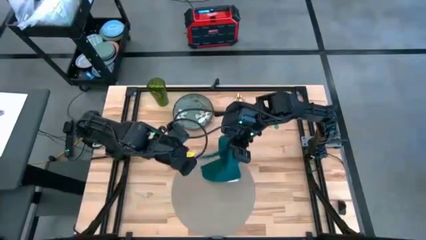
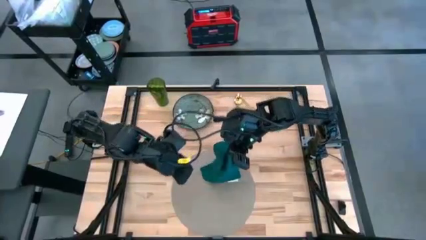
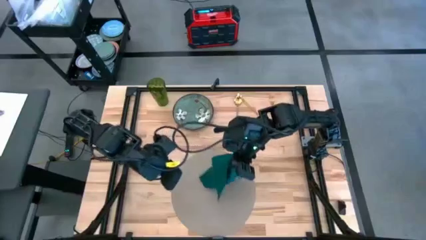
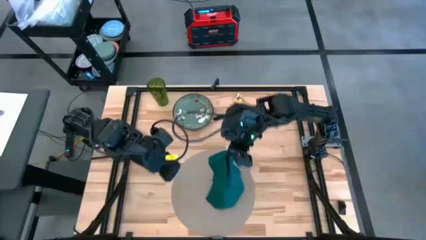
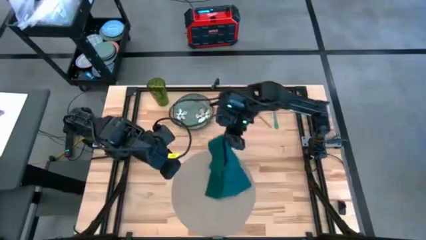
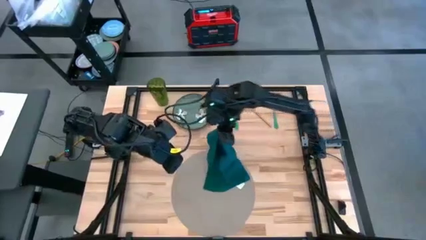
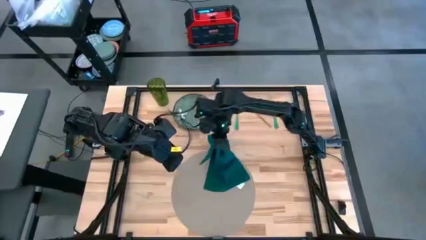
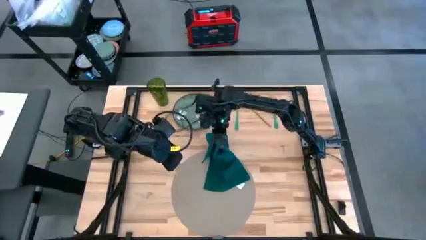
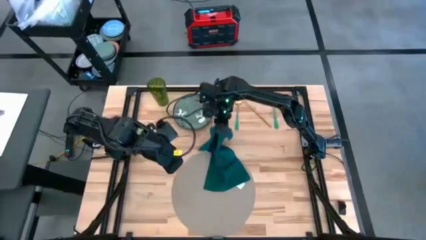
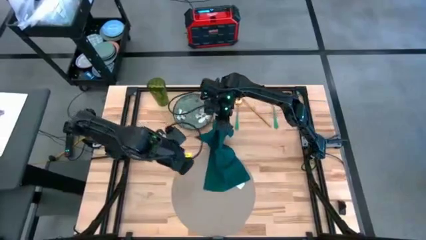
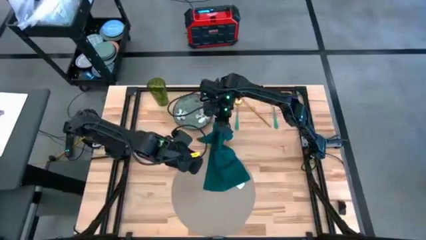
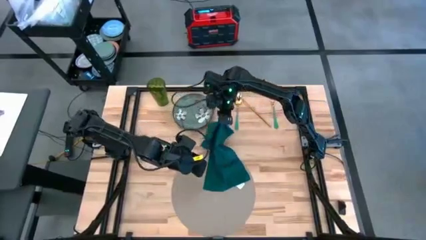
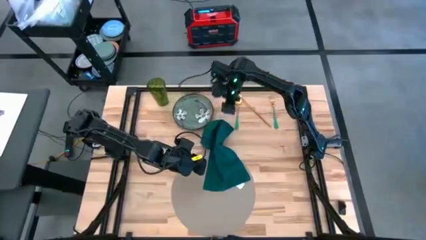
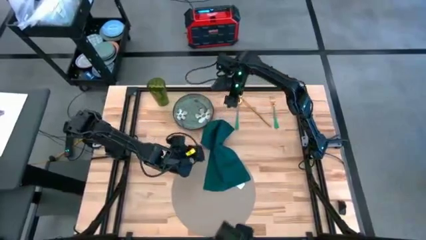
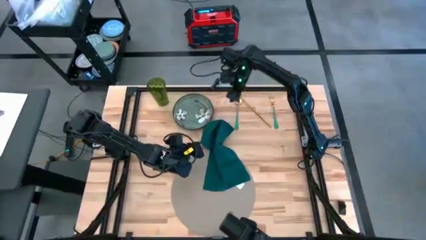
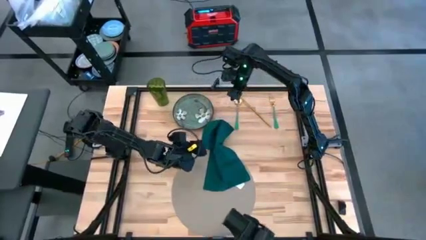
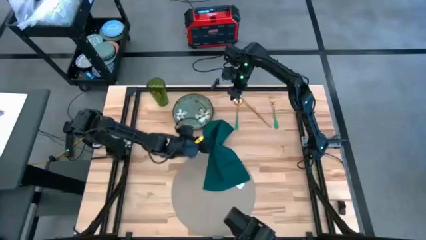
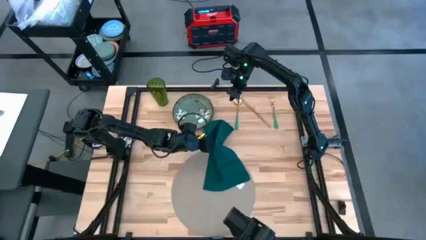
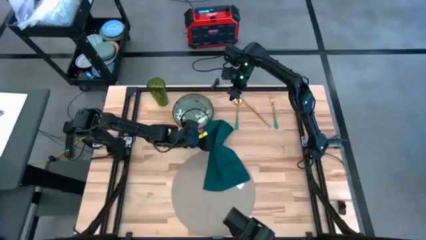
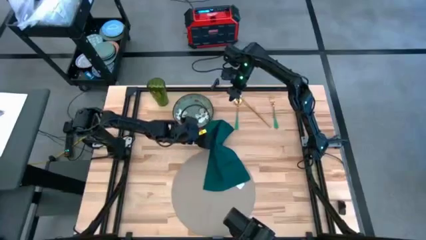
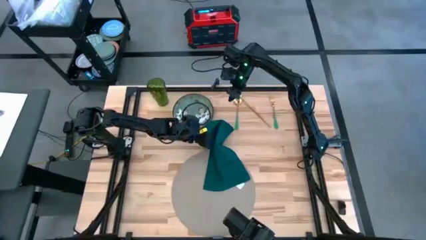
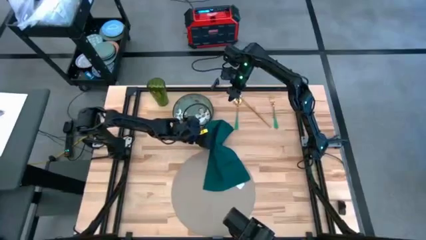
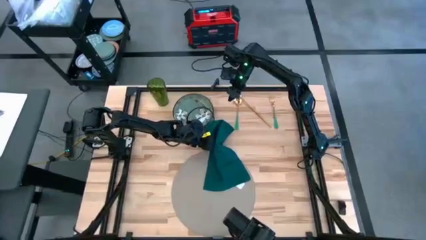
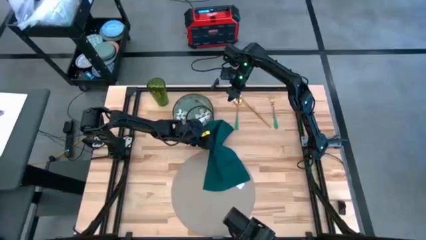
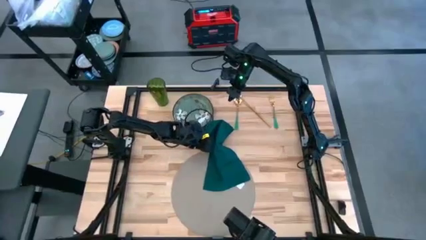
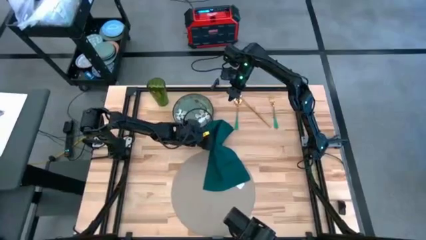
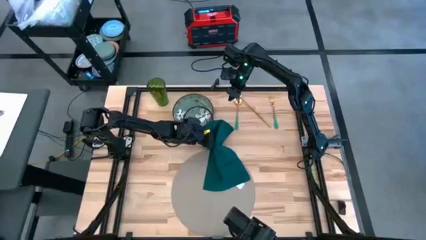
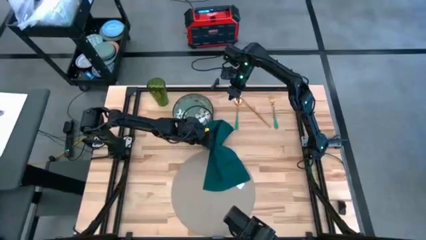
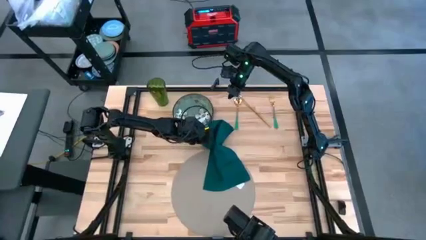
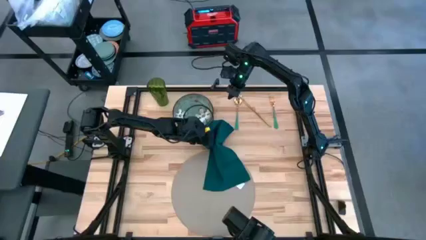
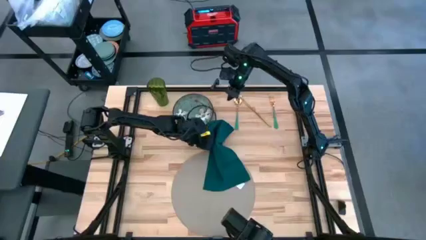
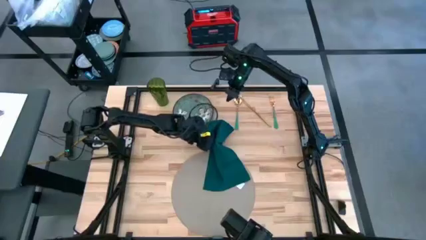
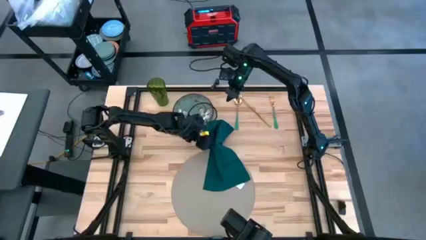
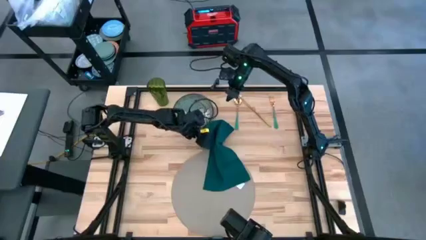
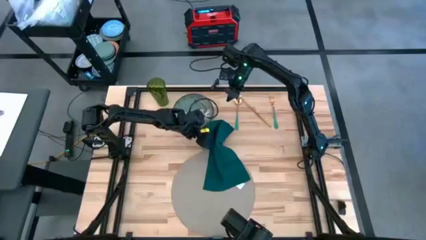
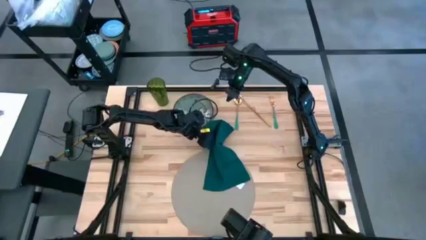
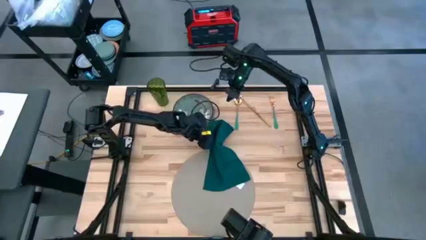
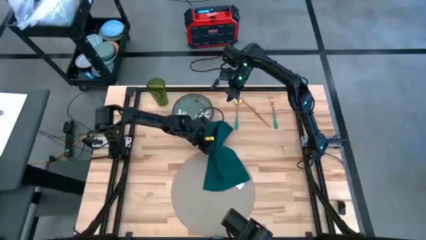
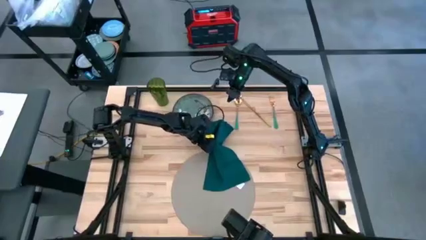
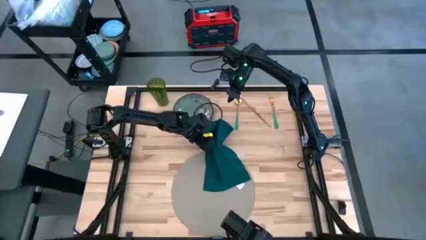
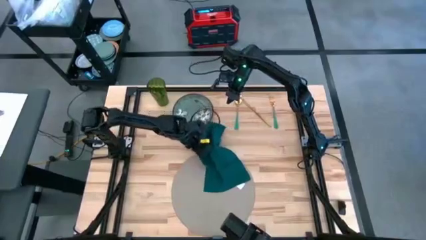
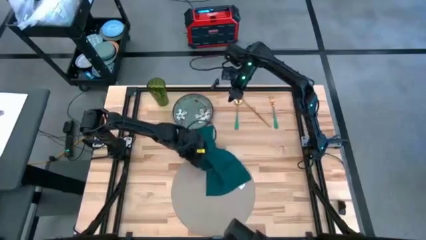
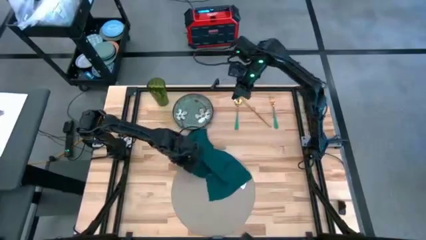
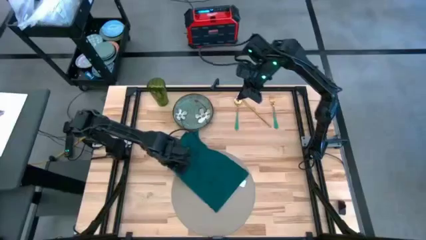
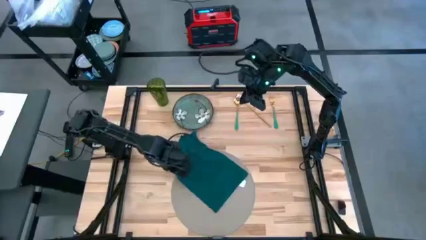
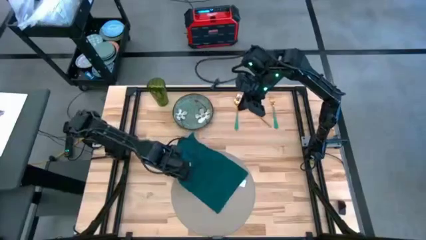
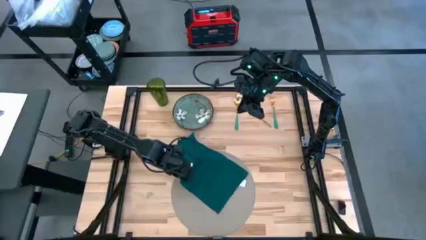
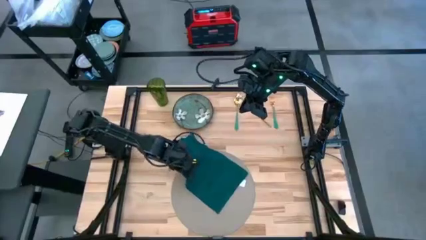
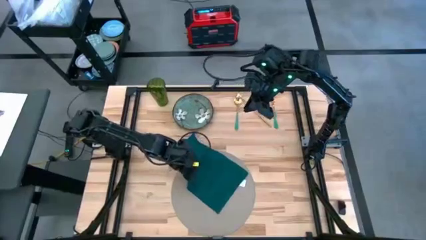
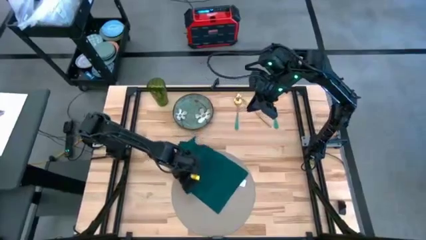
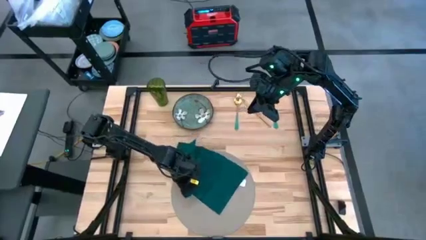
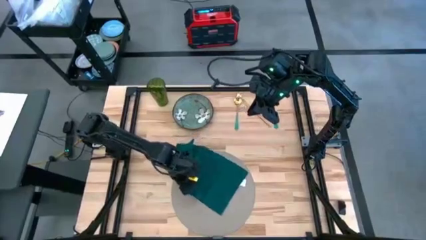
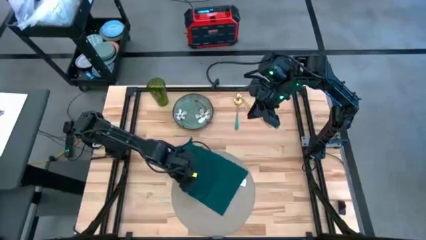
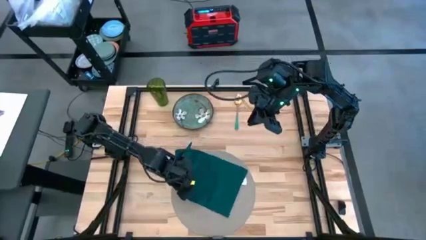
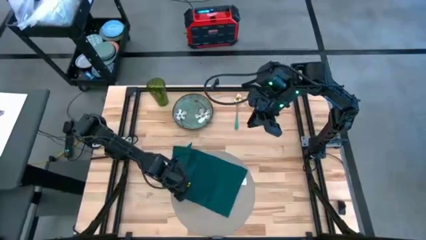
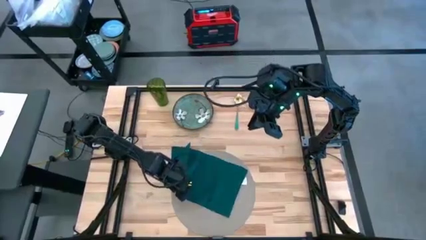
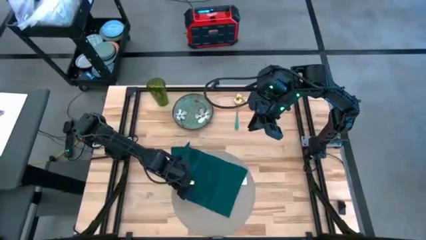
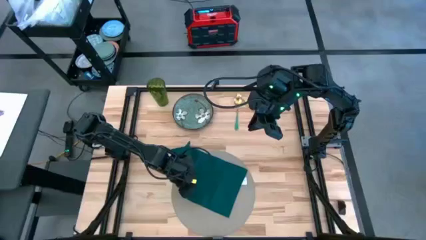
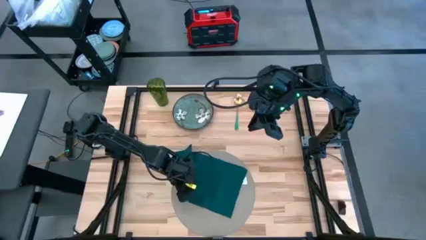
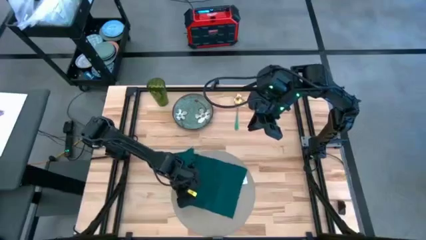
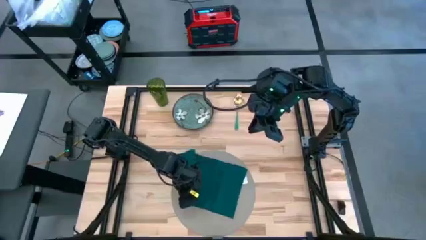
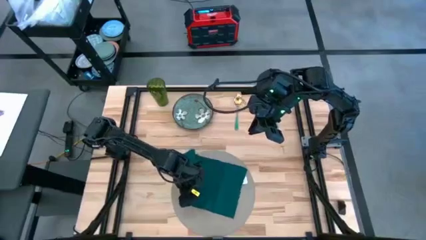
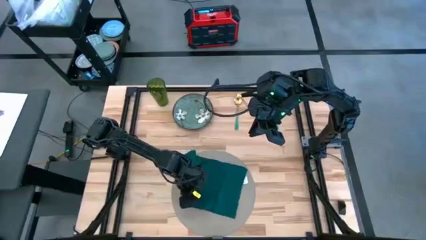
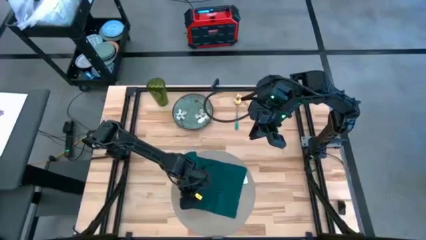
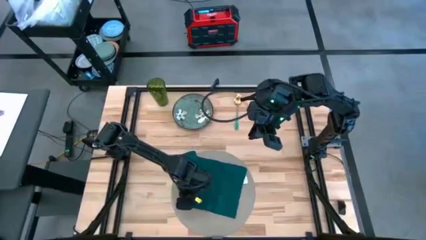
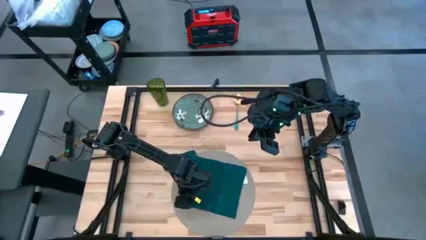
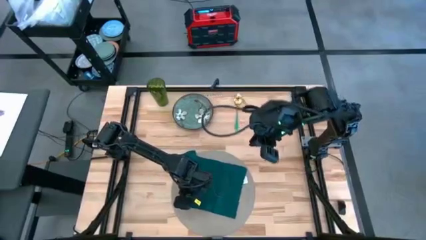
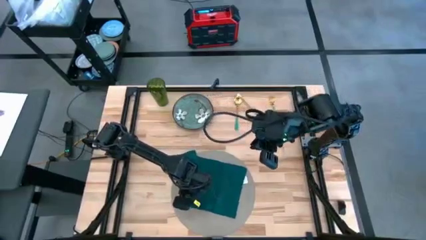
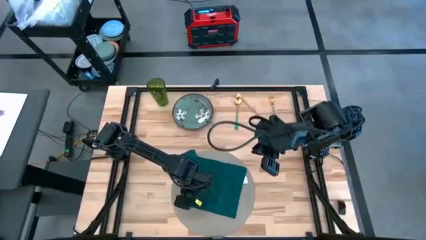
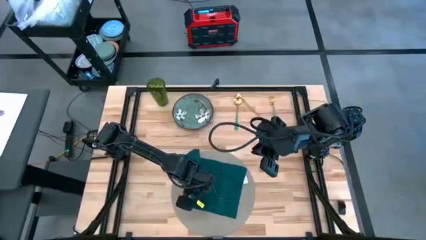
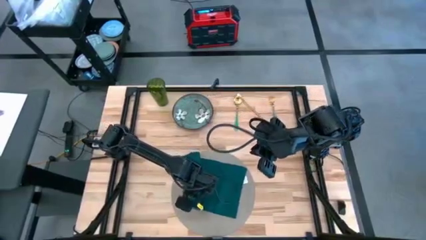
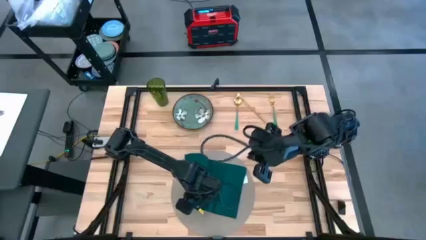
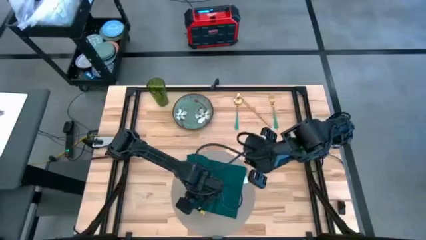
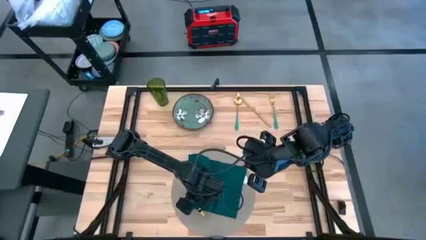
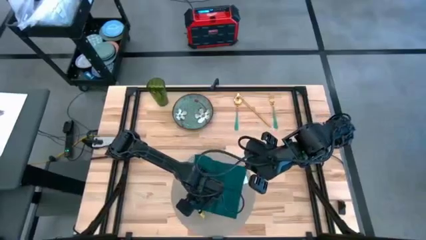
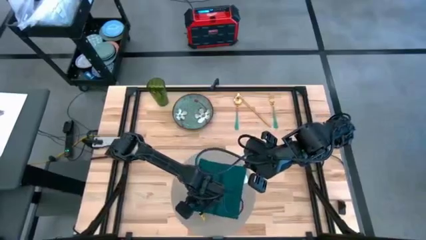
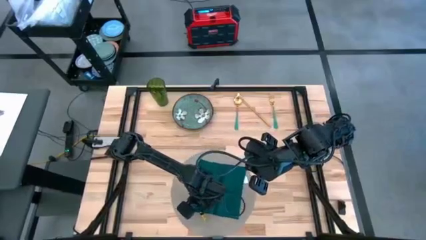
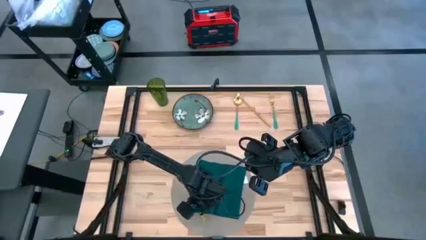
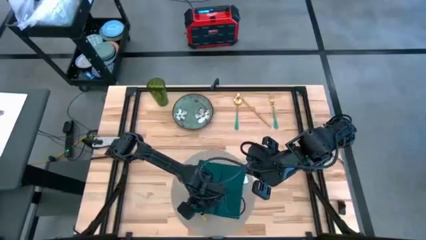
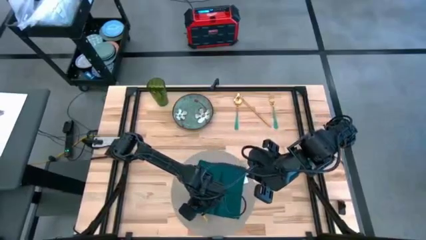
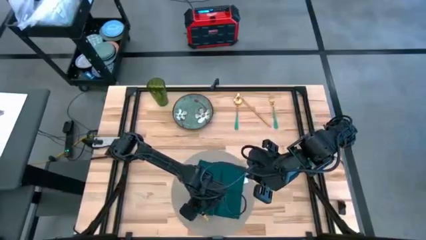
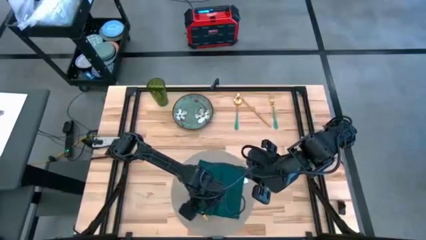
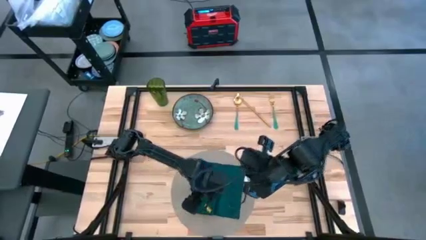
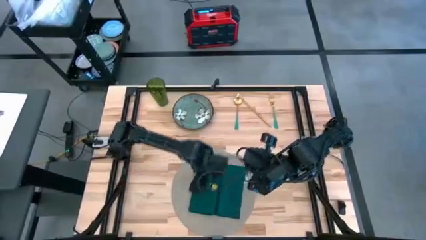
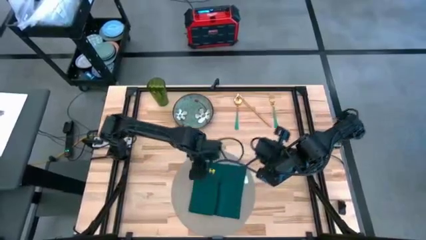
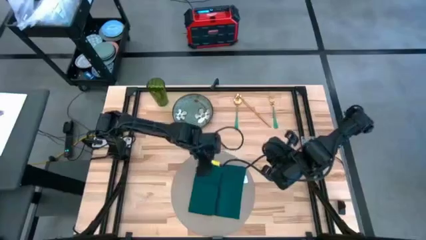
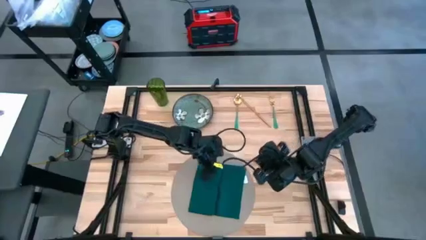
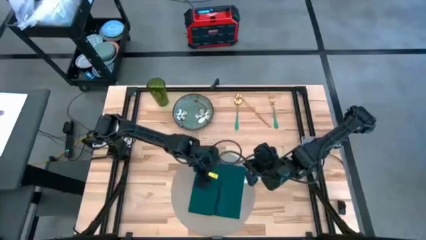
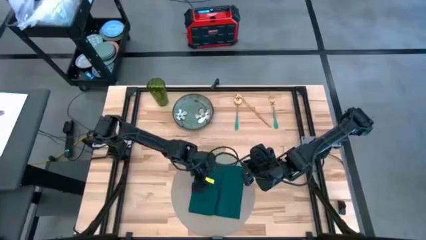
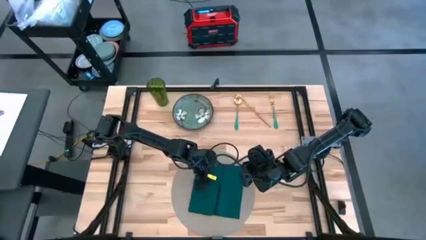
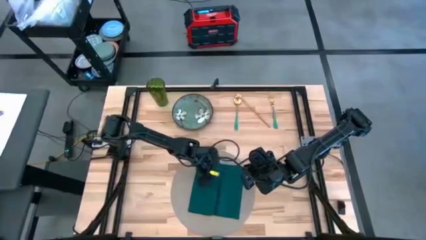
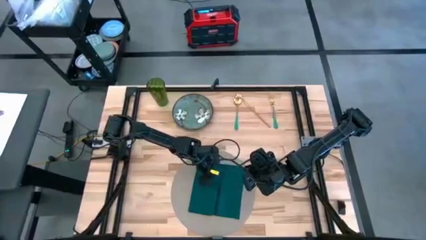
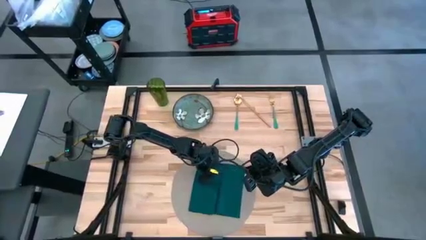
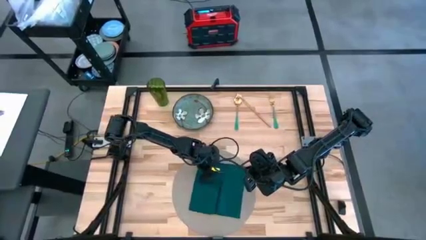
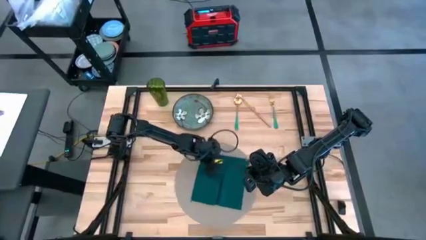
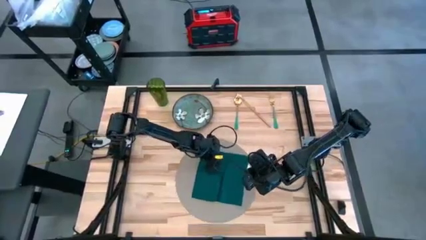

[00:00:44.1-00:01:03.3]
Task: Set table place
Fold the green napkin
